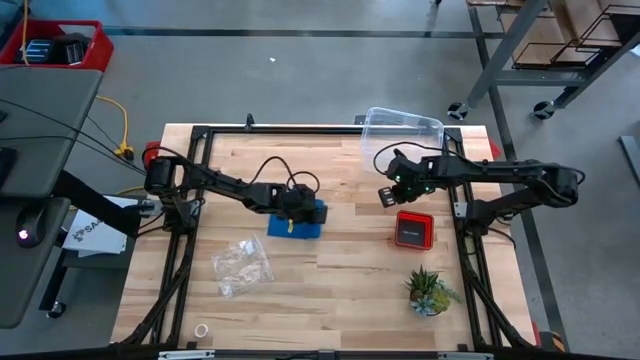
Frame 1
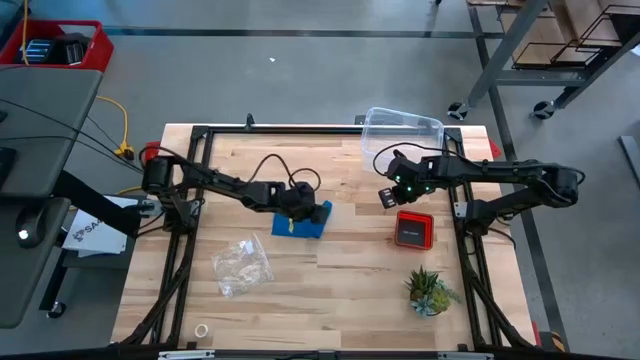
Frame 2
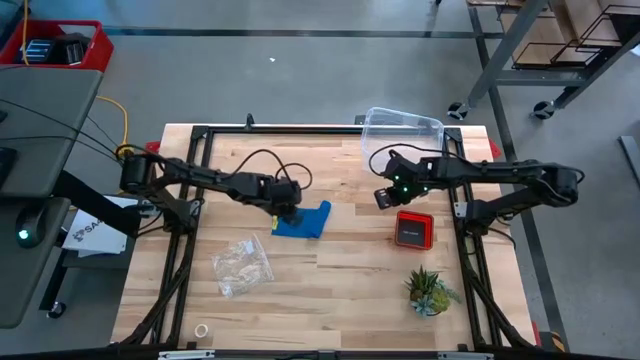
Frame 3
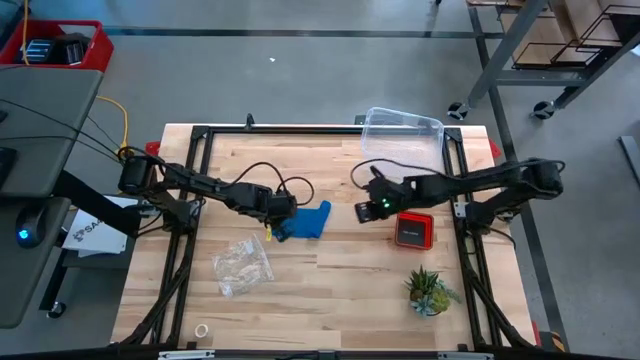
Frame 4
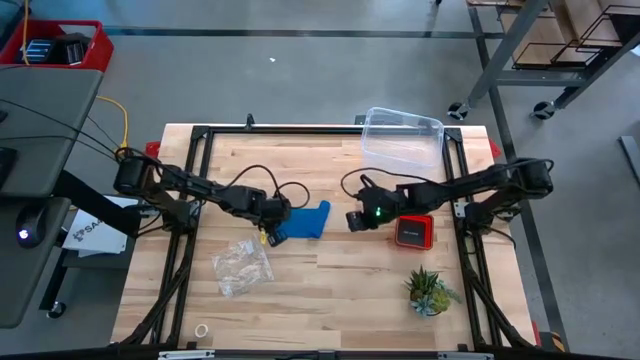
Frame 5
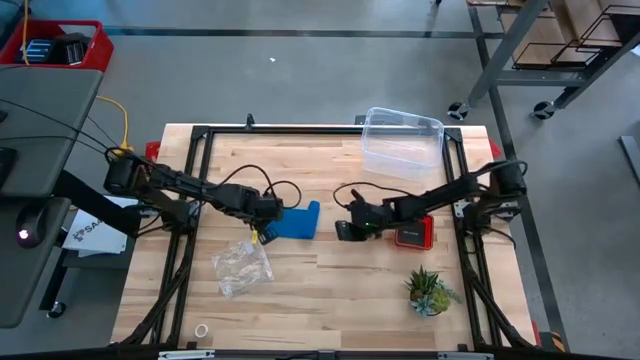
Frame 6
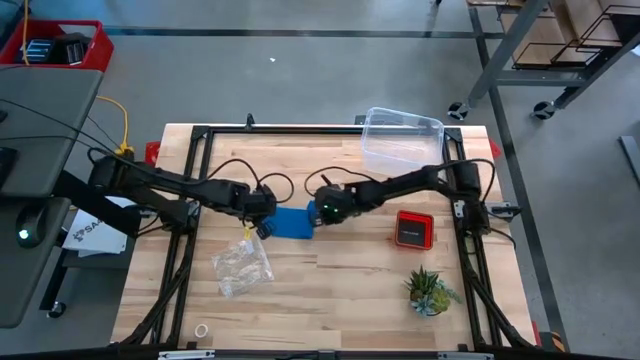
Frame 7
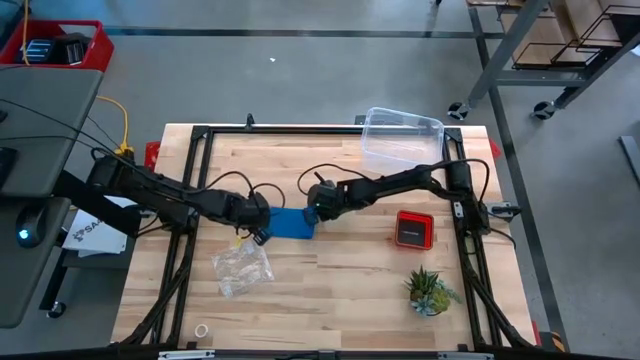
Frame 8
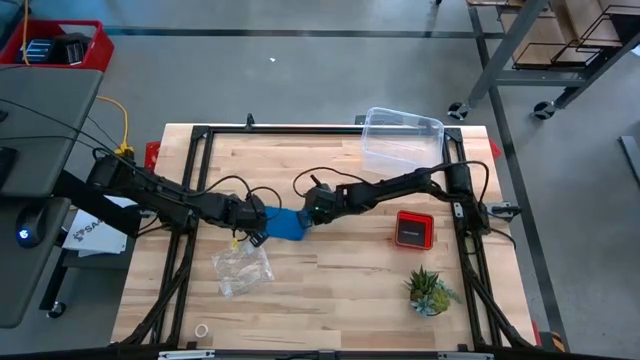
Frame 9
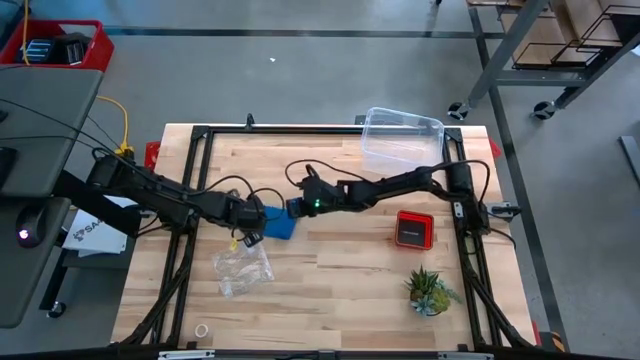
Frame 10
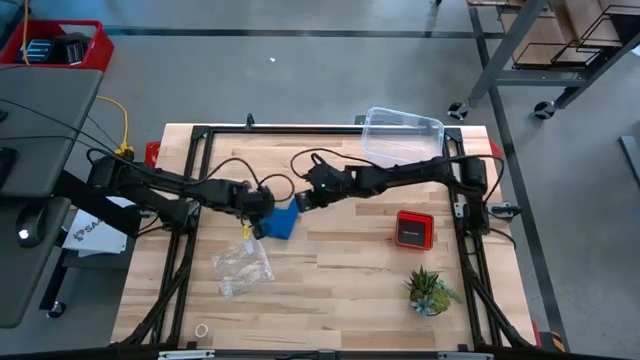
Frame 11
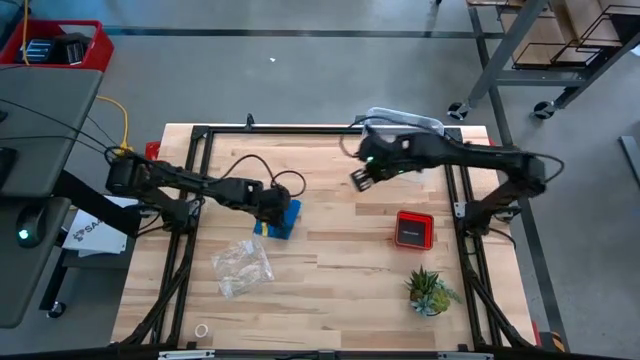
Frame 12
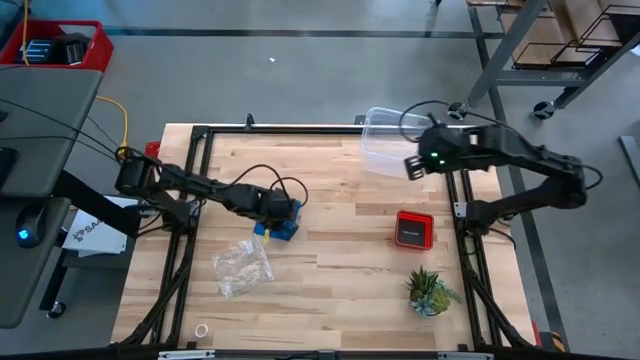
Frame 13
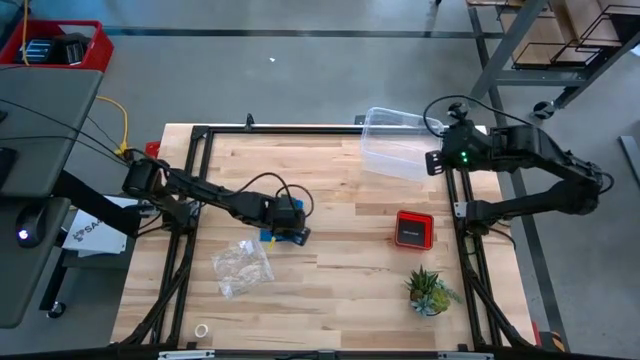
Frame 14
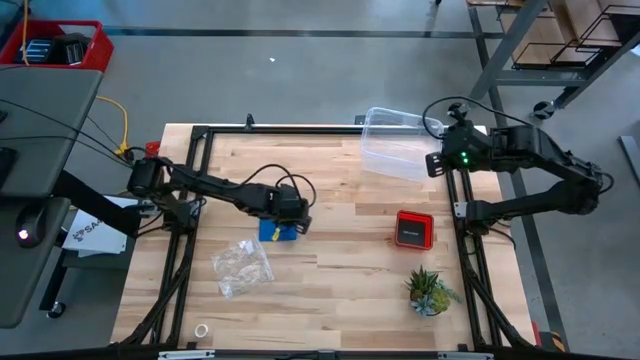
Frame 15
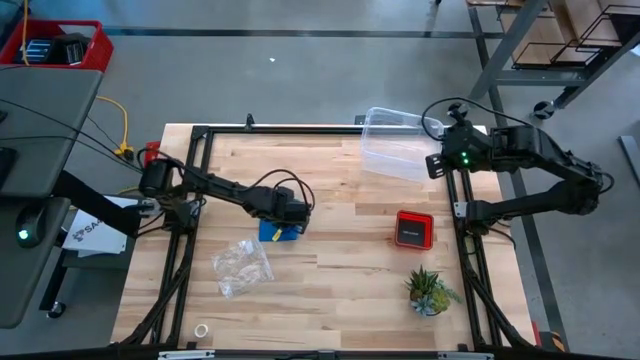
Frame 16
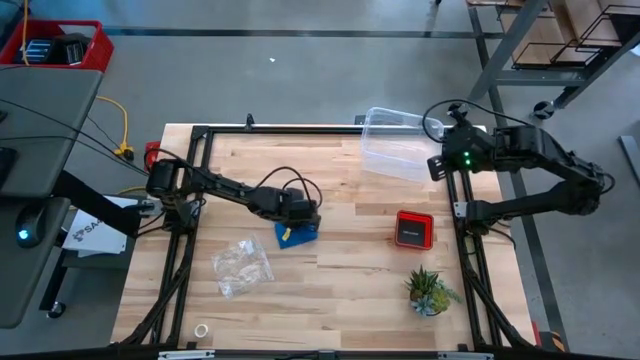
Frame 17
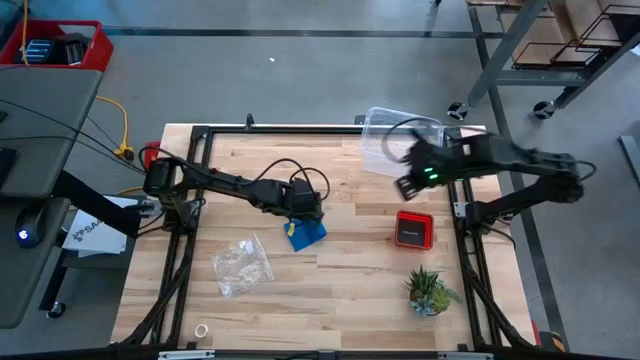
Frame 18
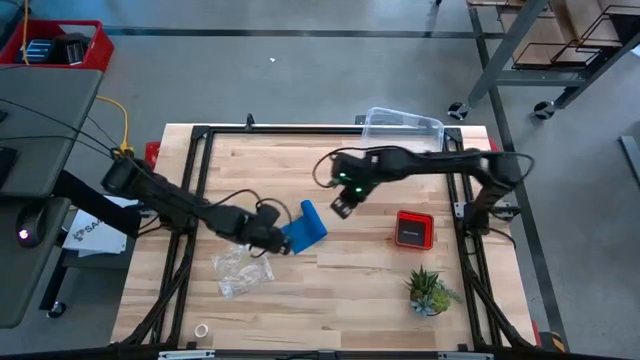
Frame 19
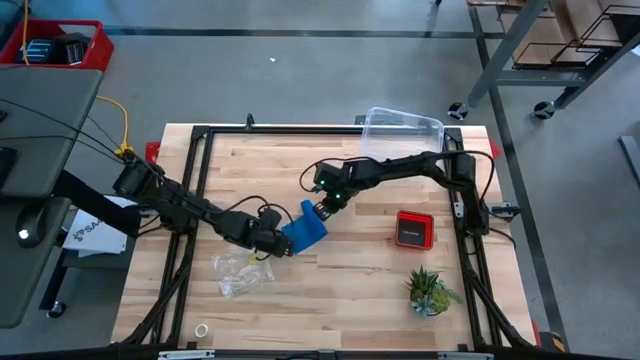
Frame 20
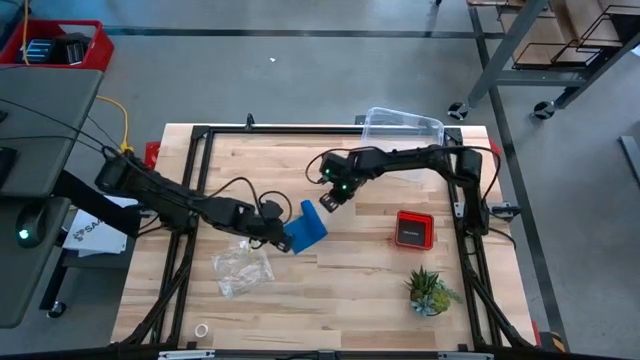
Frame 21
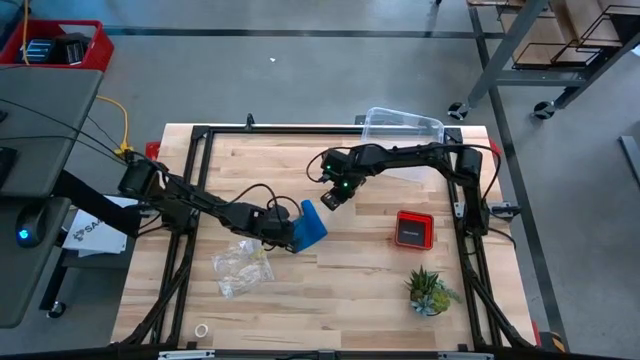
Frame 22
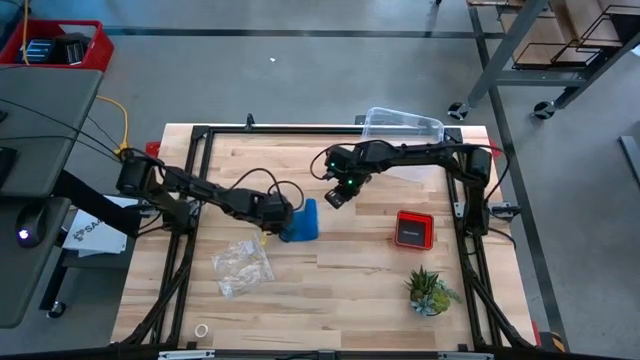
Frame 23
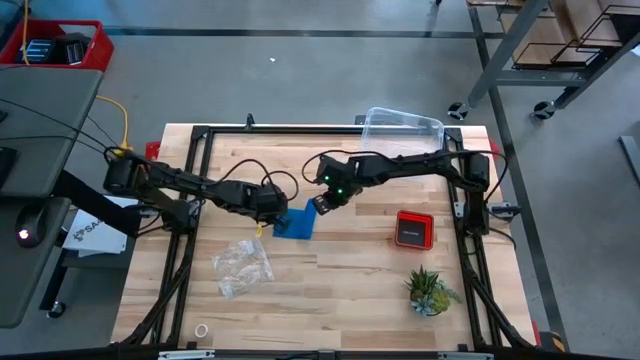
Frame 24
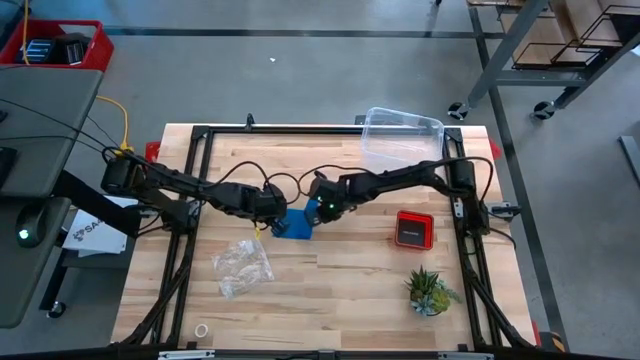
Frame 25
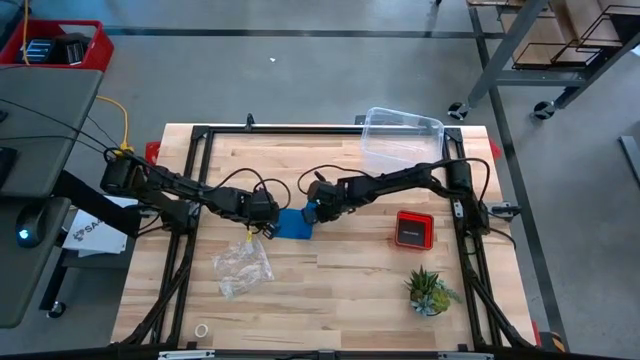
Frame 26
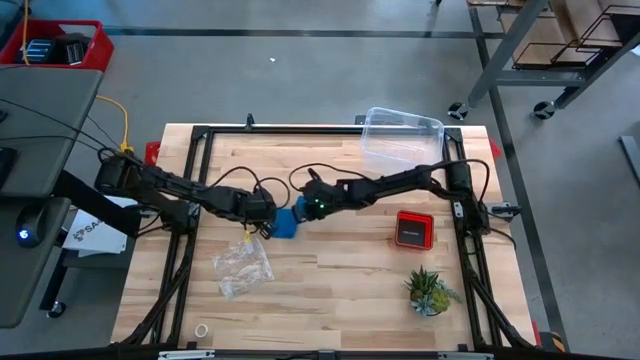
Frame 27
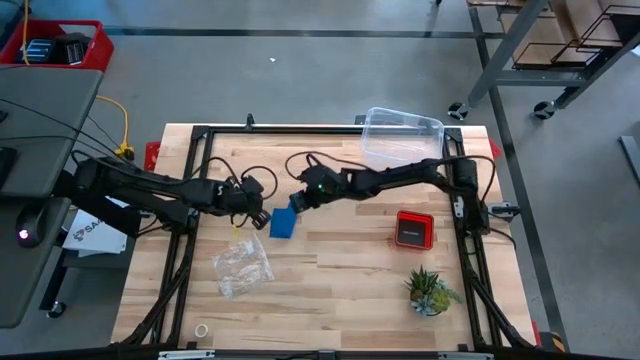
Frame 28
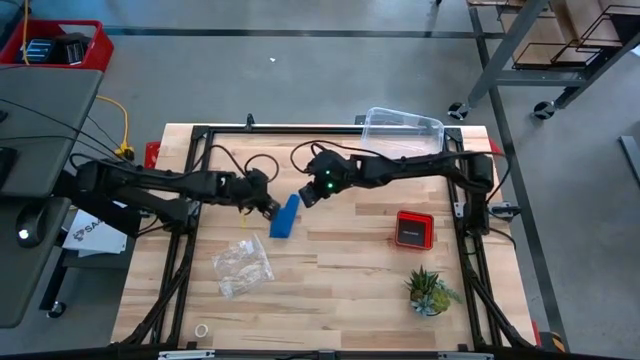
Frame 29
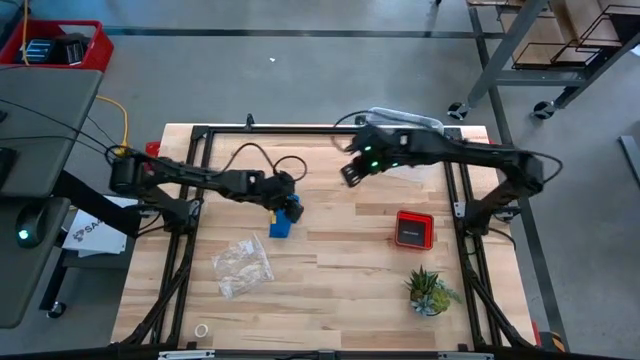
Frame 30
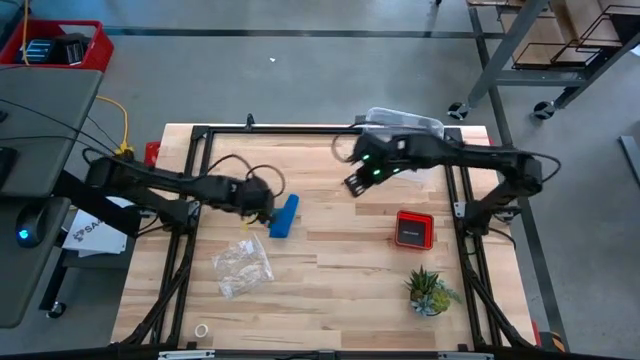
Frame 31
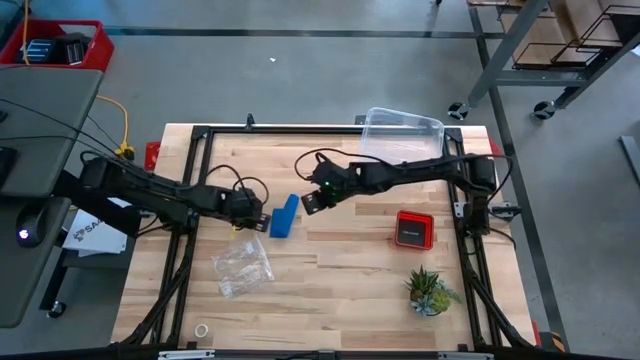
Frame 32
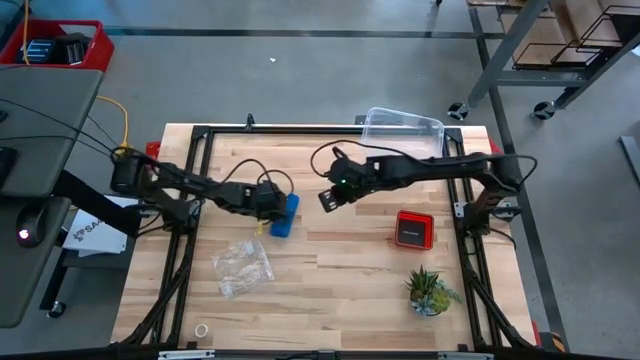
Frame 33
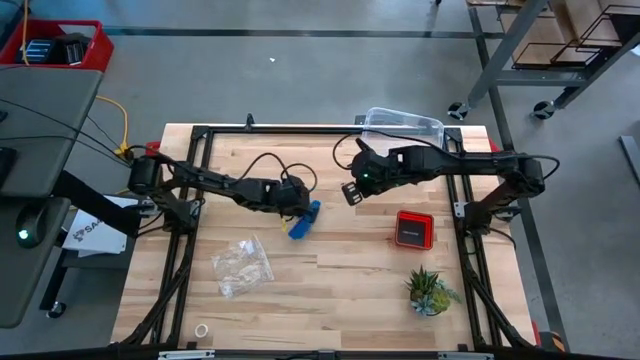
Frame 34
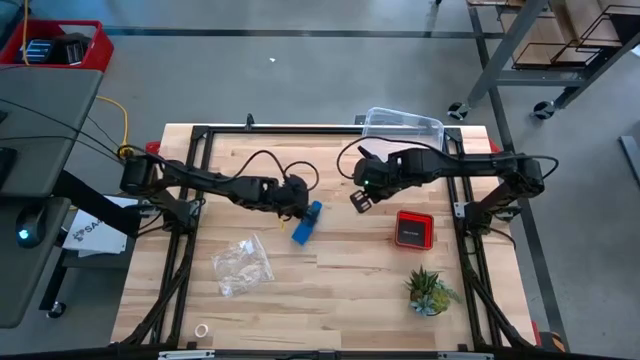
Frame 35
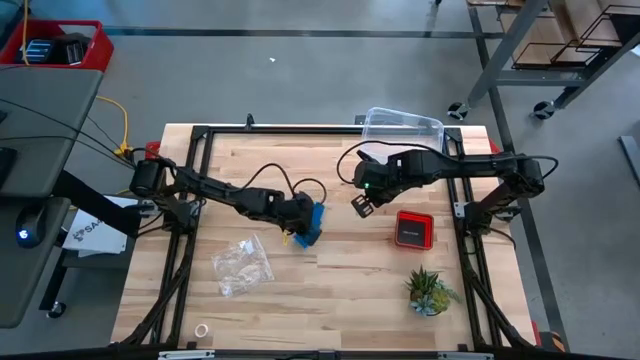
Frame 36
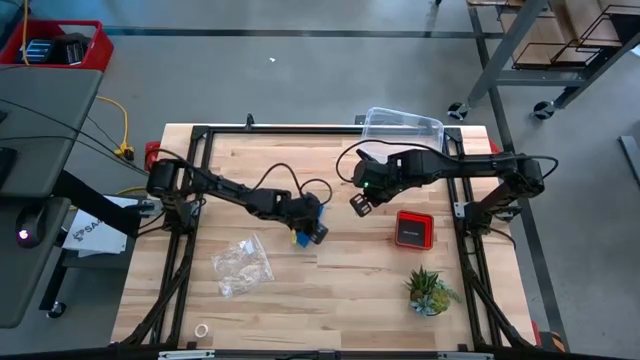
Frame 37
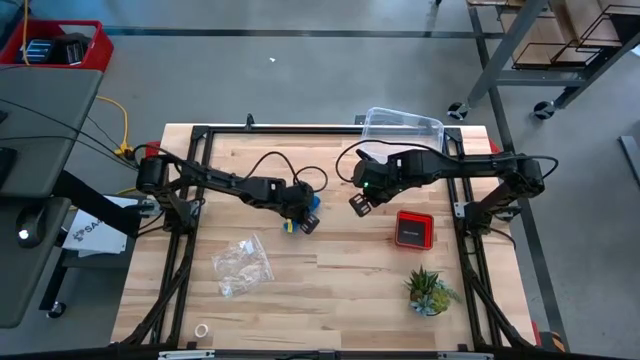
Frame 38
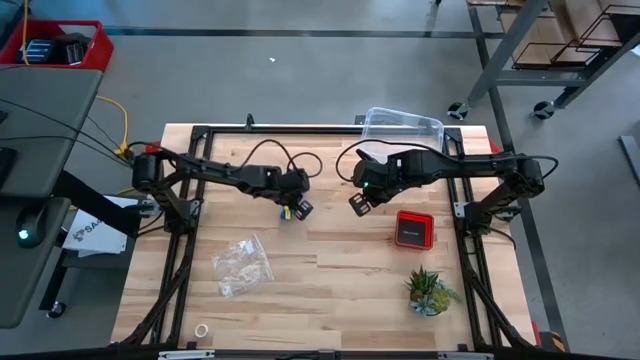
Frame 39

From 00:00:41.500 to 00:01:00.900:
Task: Roll bandage
Roll the blue bandage

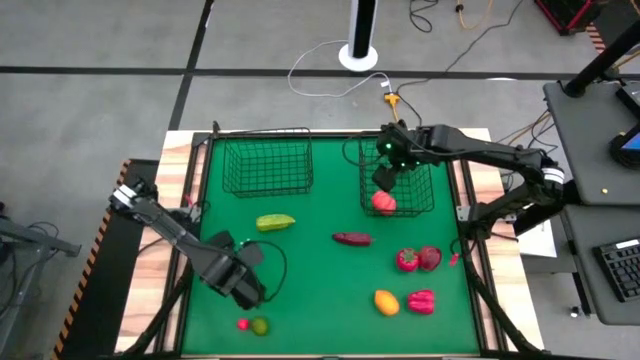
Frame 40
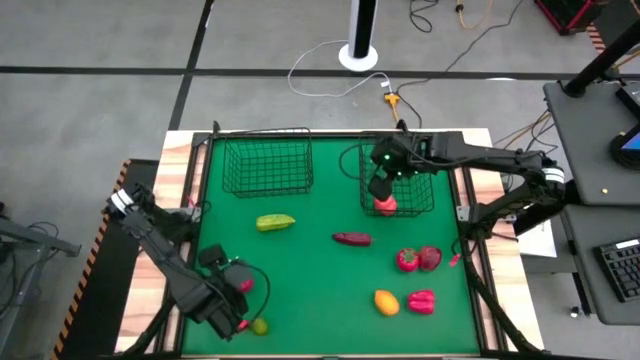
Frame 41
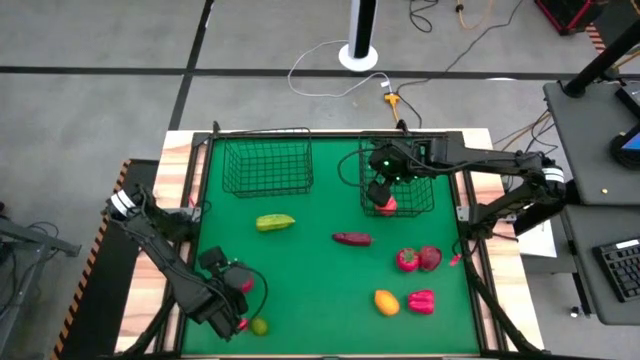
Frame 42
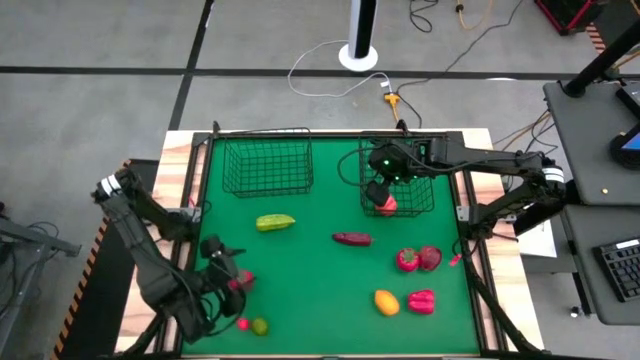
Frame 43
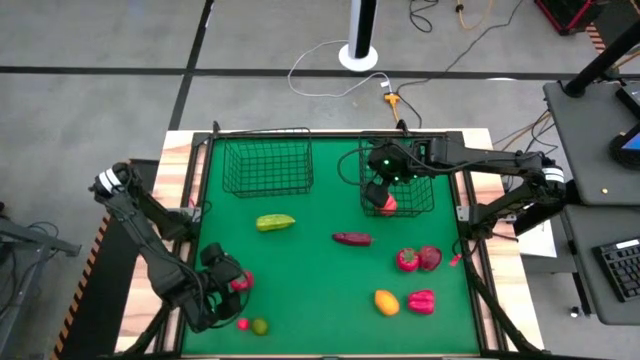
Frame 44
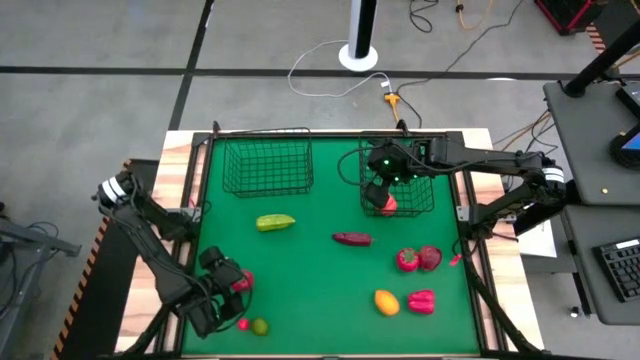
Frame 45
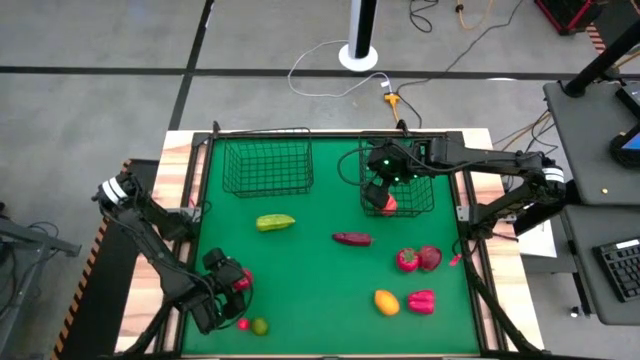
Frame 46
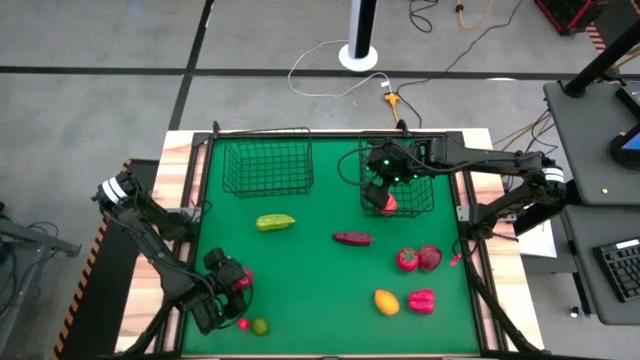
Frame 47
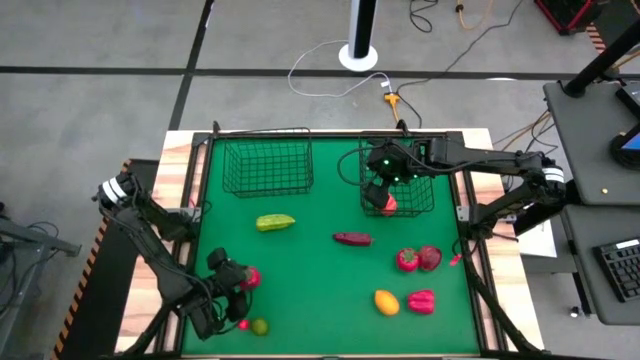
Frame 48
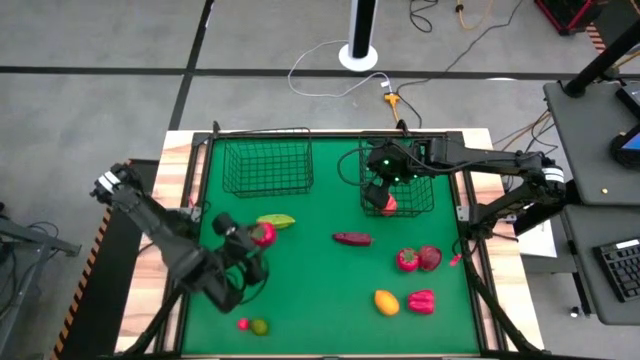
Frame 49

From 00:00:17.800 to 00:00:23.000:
Task: Sort produce into baskets
Put the left red tomato into the left wire basket
